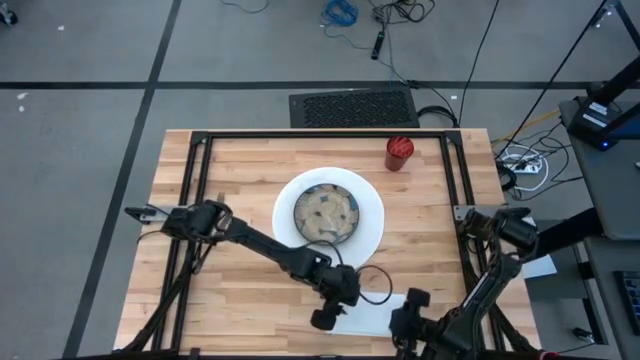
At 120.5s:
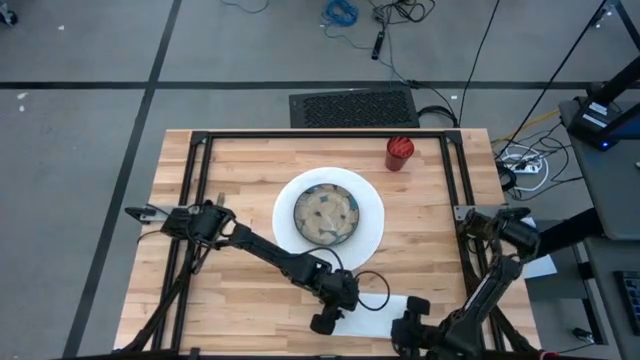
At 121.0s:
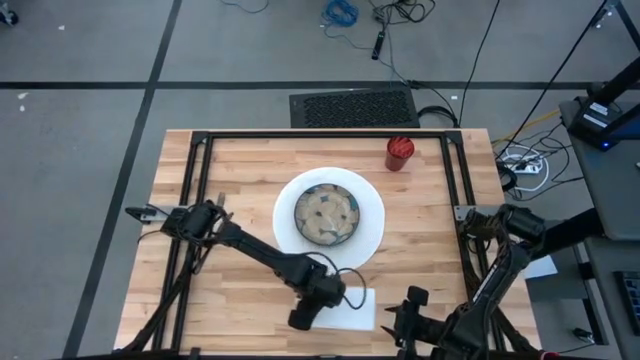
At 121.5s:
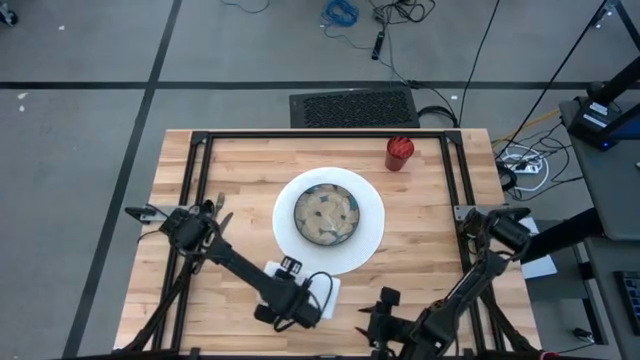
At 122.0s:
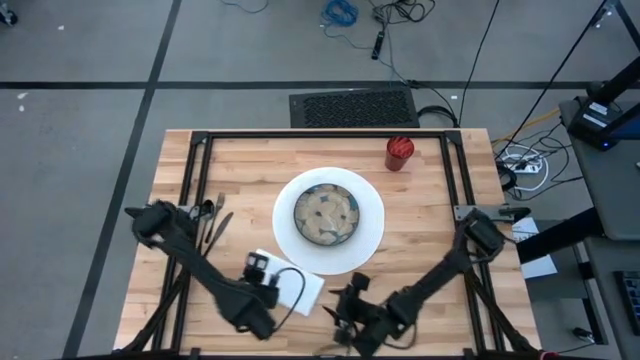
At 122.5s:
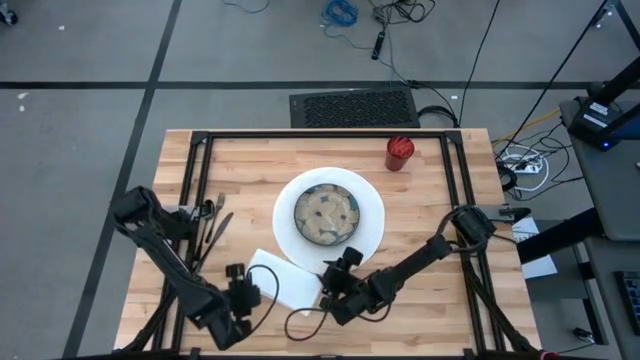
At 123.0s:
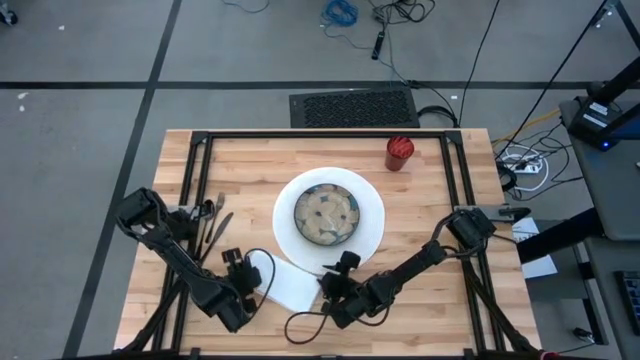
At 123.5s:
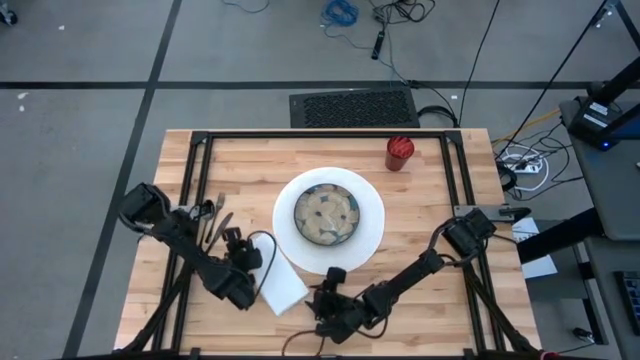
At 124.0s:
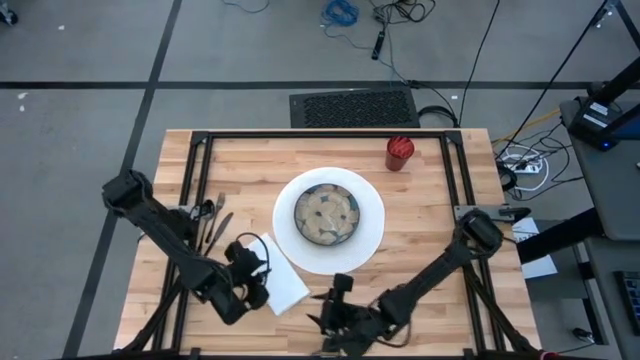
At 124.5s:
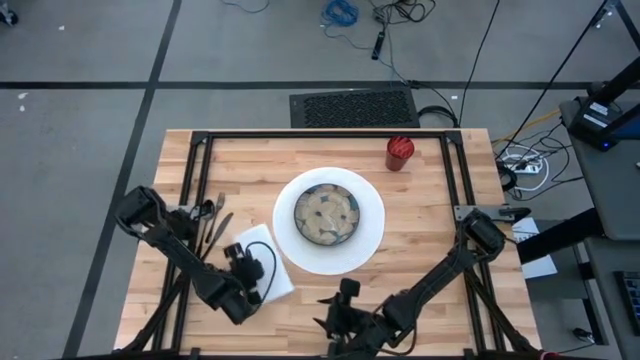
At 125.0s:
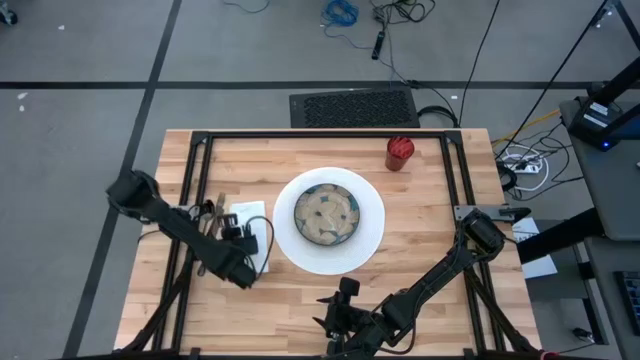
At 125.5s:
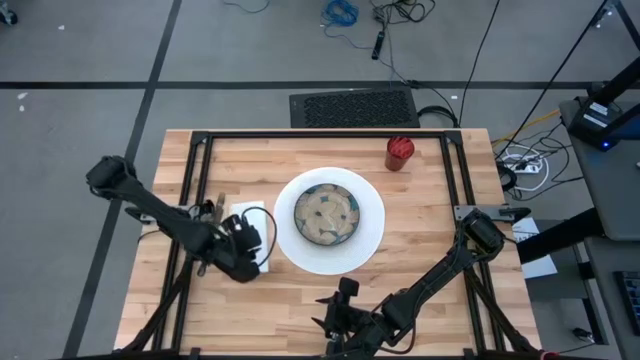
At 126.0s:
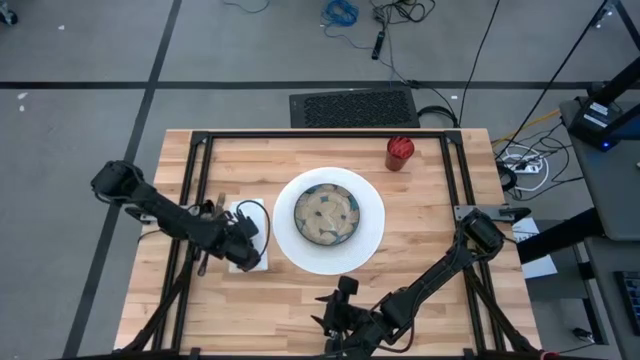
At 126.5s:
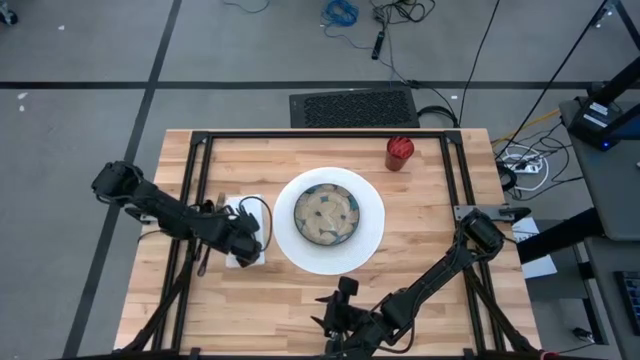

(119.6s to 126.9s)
Task: Set table place
Put the white table napkin to the left of the white table mat

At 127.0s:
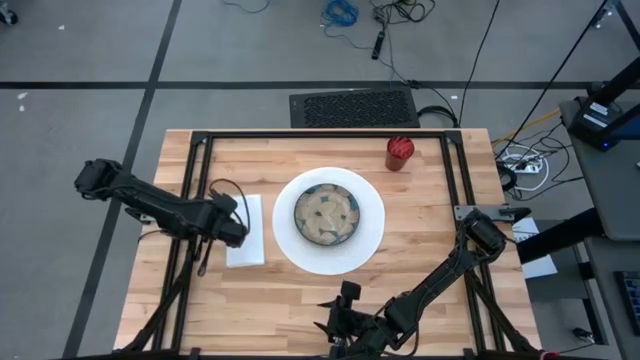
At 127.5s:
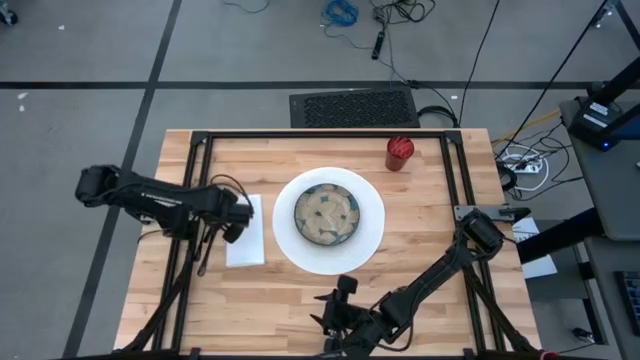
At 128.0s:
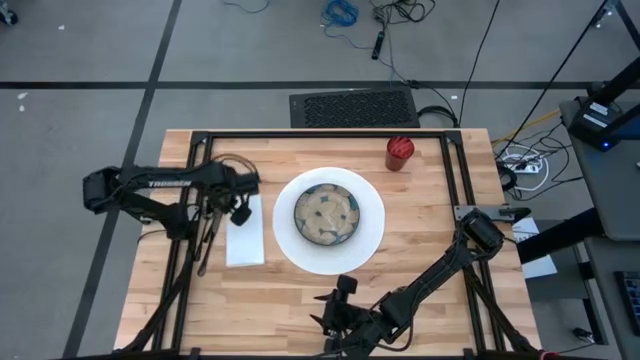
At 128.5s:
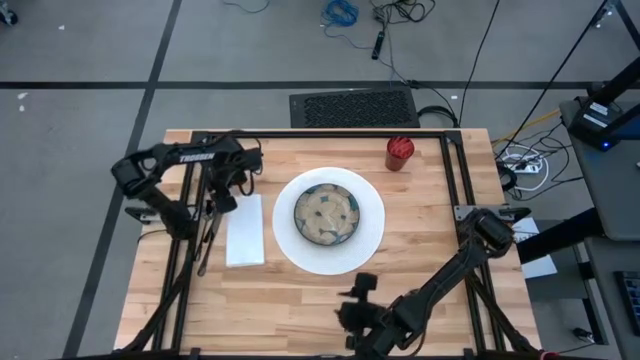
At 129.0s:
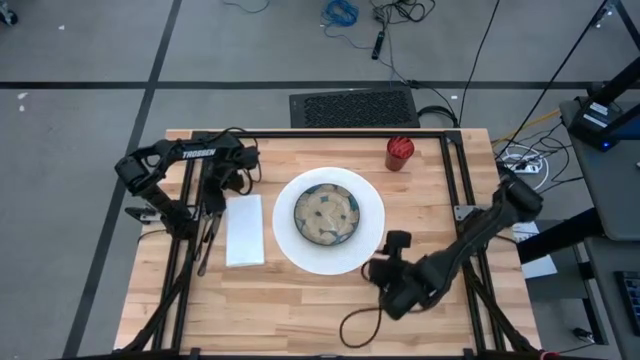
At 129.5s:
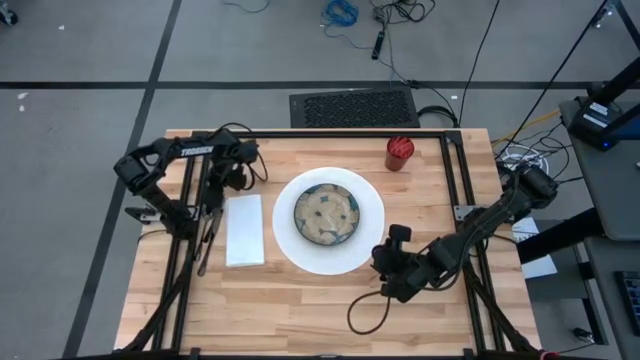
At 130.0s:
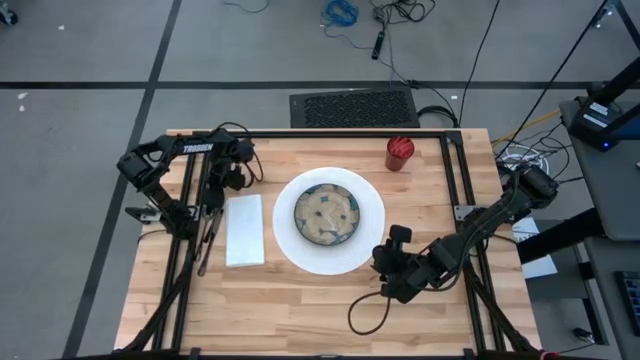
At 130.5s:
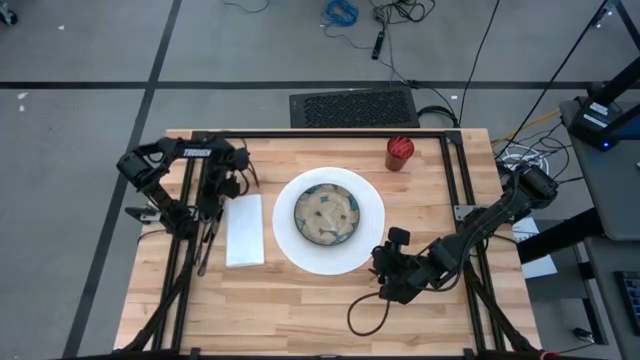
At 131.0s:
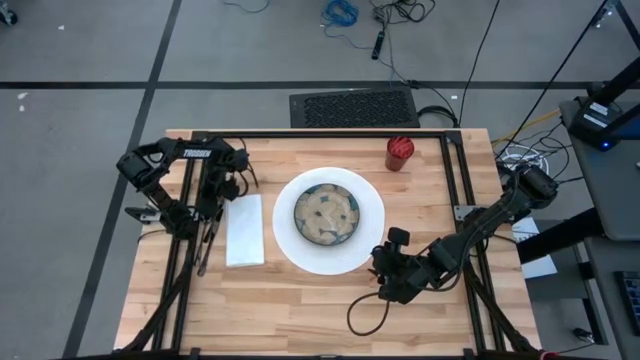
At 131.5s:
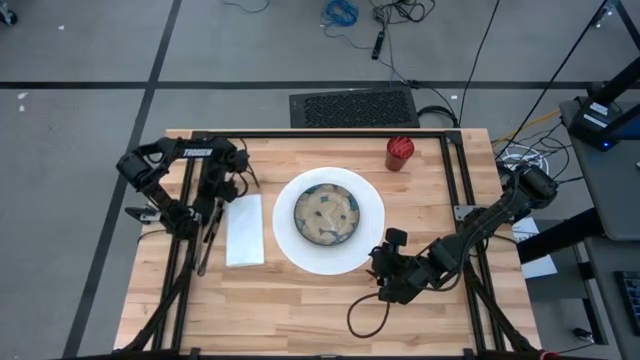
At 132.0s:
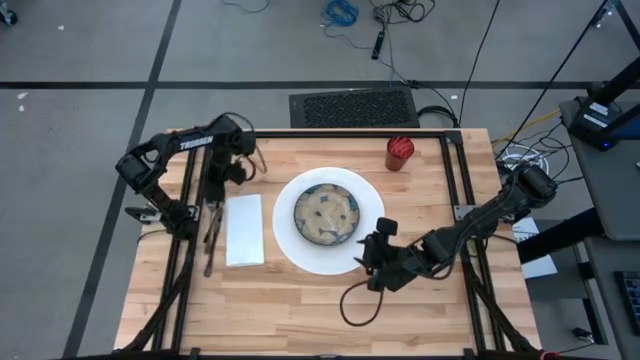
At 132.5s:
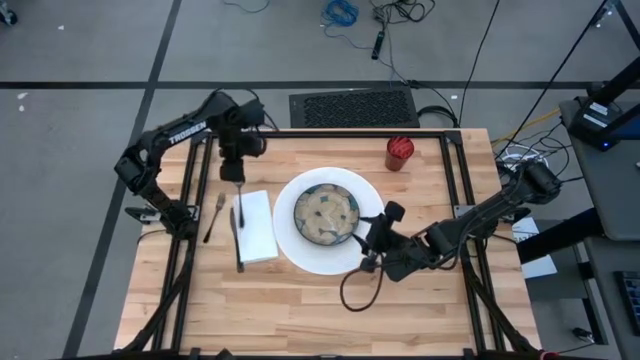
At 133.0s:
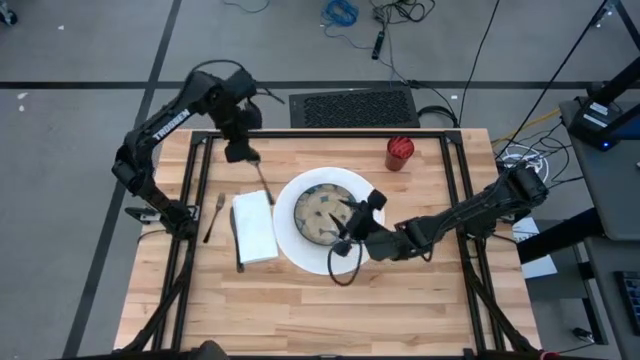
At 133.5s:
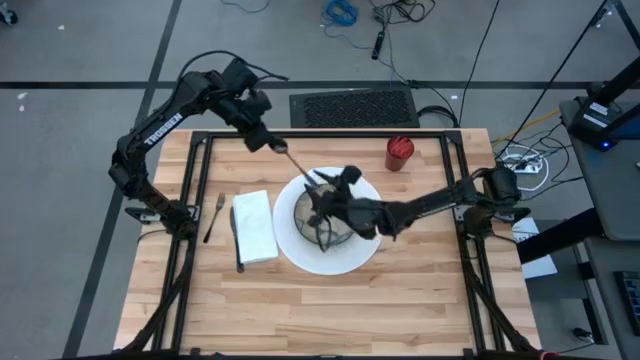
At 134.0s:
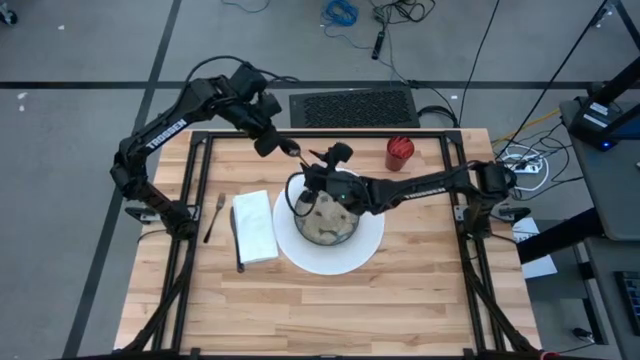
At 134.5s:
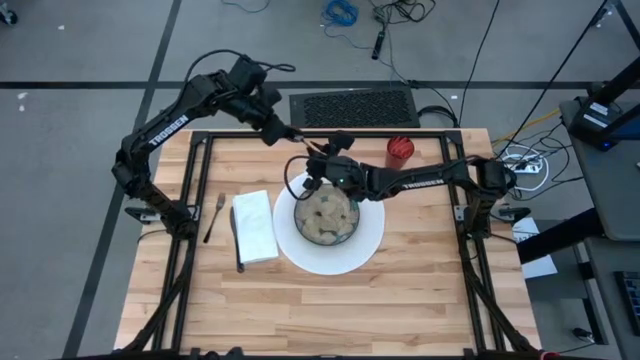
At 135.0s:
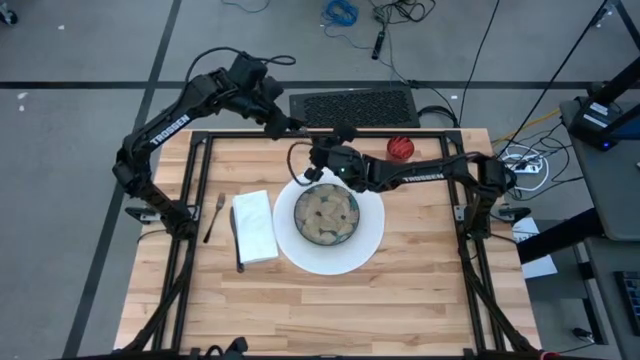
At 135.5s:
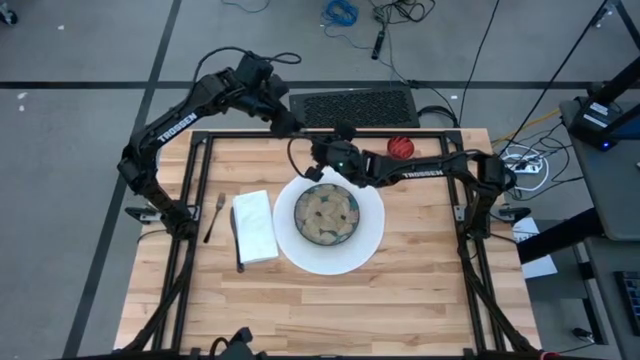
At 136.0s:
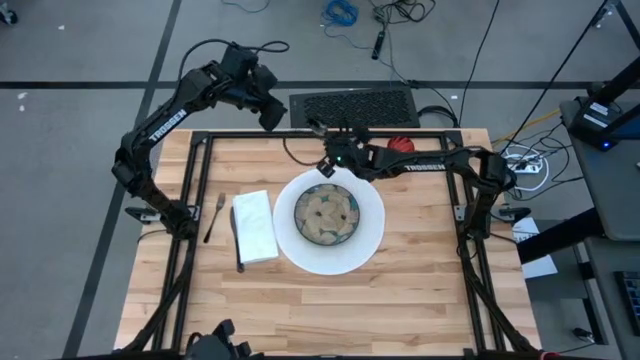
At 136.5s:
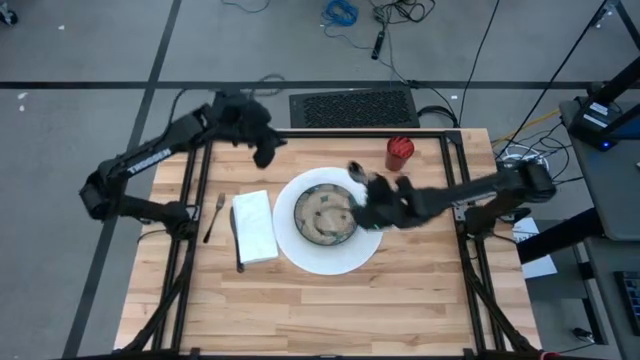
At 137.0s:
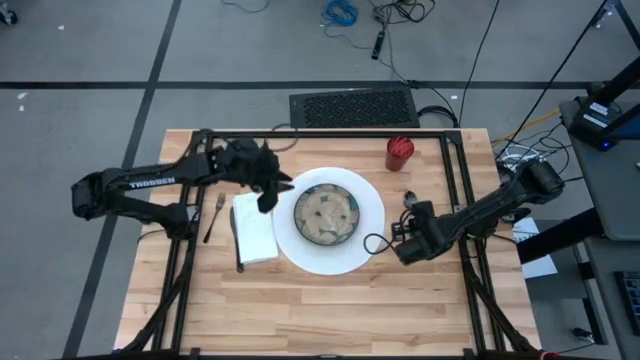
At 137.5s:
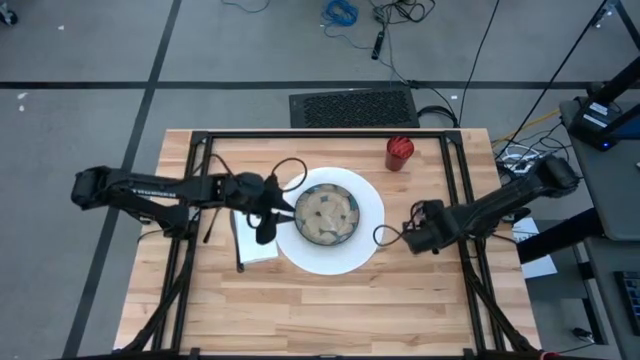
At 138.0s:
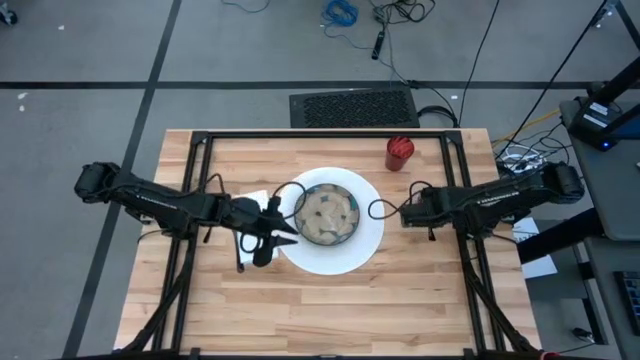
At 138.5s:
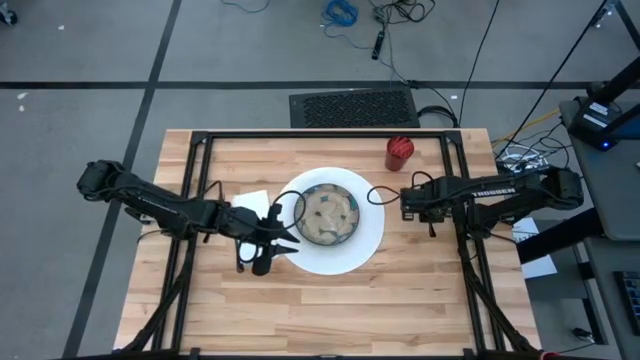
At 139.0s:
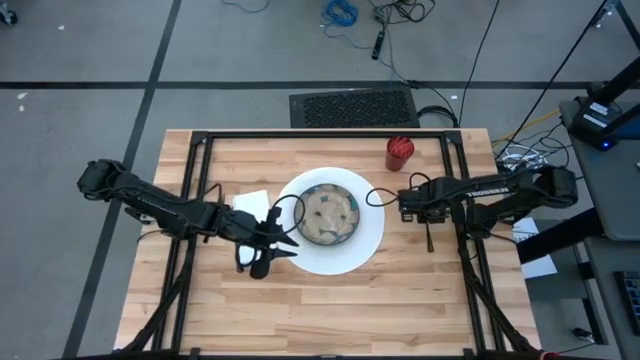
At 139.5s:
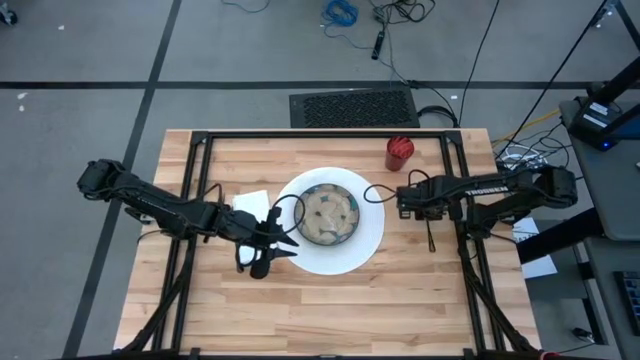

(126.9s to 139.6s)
Put the black spoon in the middle right of the table

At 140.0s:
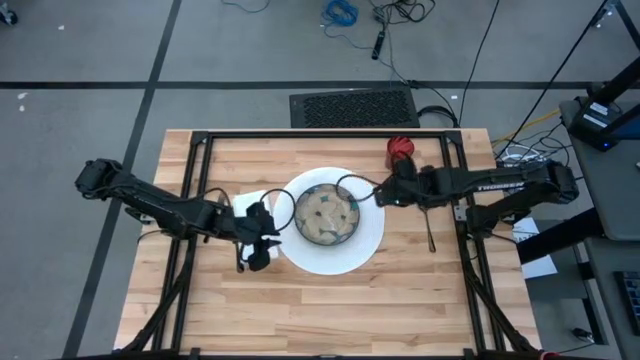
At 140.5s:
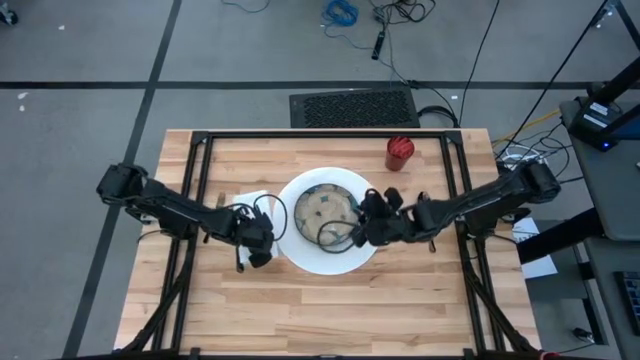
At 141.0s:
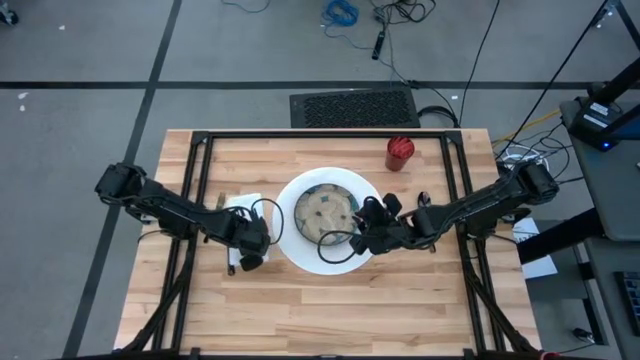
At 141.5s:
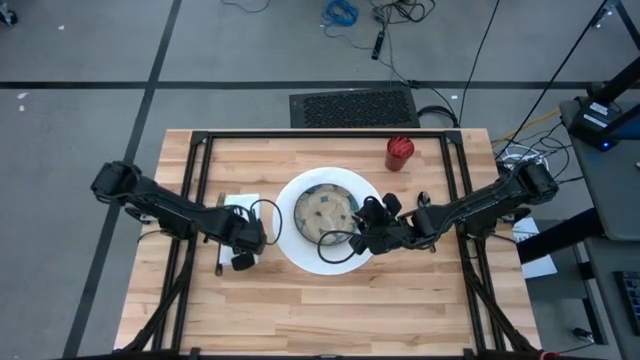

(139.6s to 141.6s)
Adjust the white table napkin
